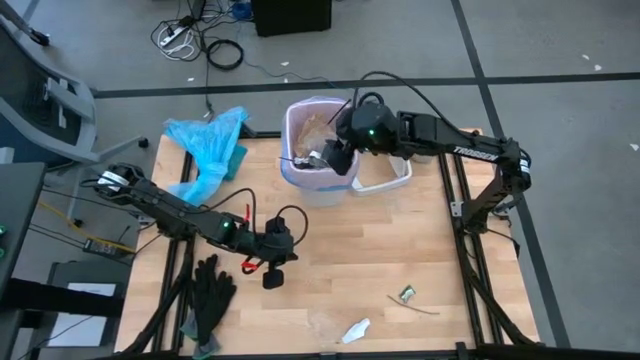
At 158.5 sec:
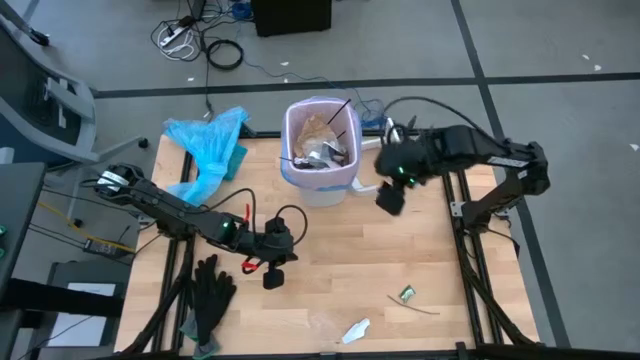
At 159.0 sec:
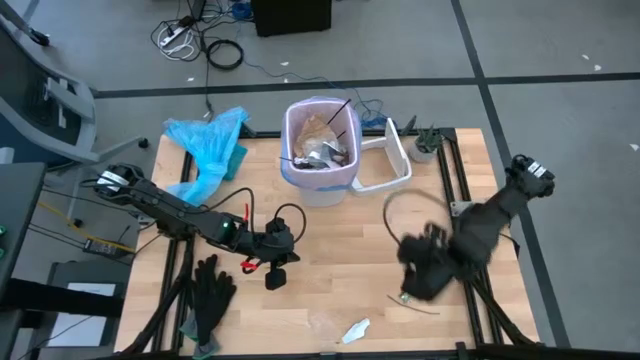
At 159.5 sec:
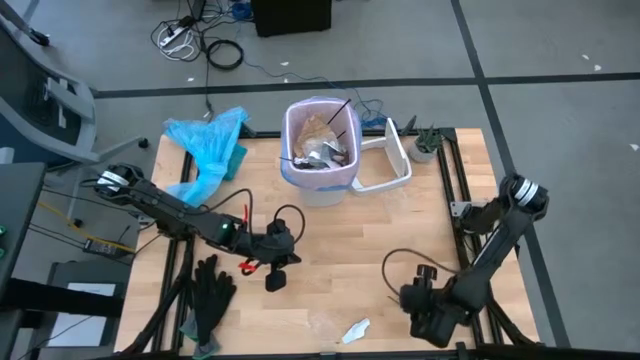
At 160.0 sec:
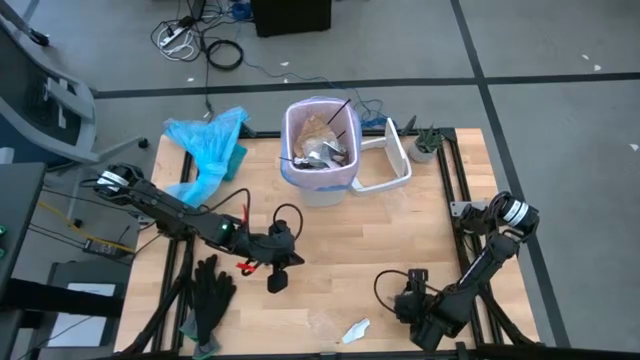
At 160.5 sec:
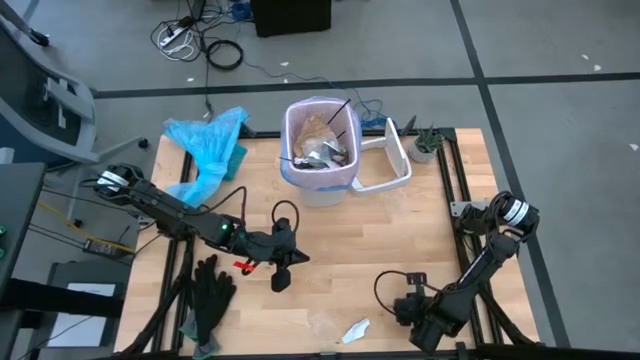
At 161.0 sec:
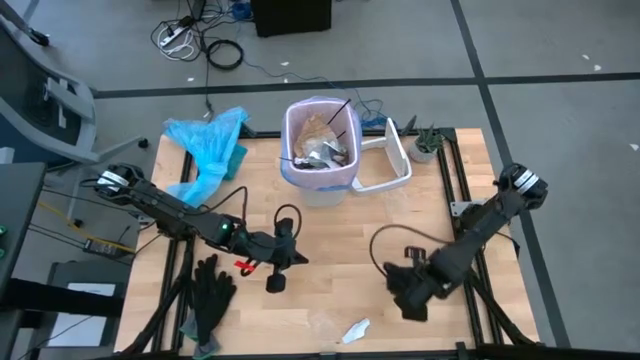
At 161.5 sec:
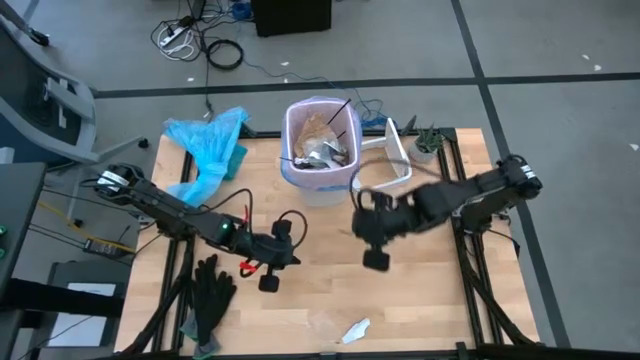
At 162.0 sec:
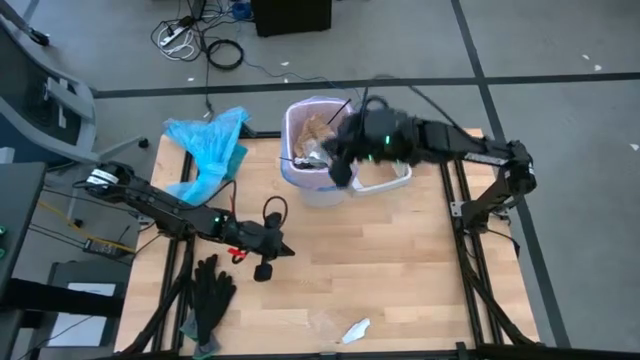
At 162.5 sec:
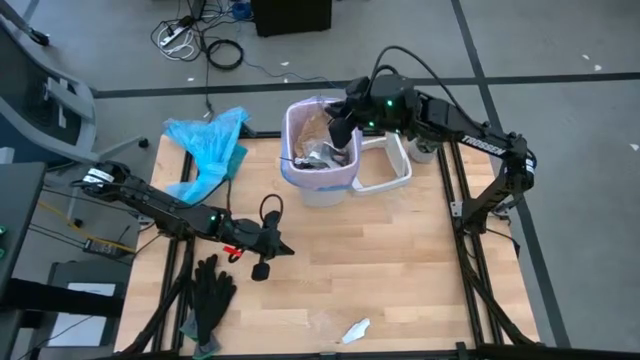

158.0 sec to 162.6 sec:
Task: place trash/remove bag and relplace
Put the green plastic material and black cable tie into the trash bin

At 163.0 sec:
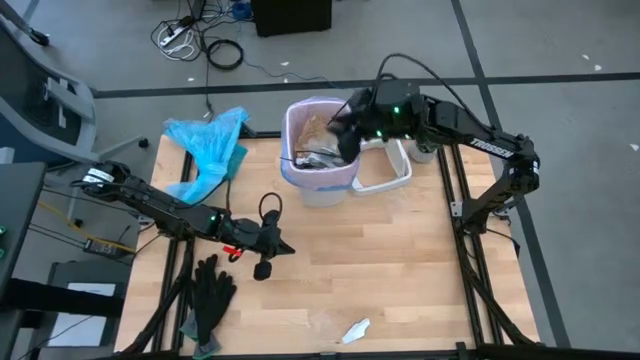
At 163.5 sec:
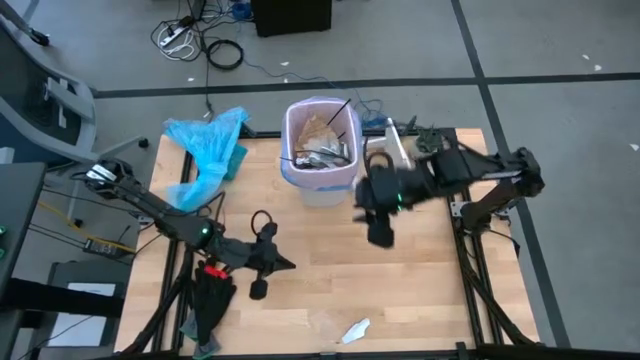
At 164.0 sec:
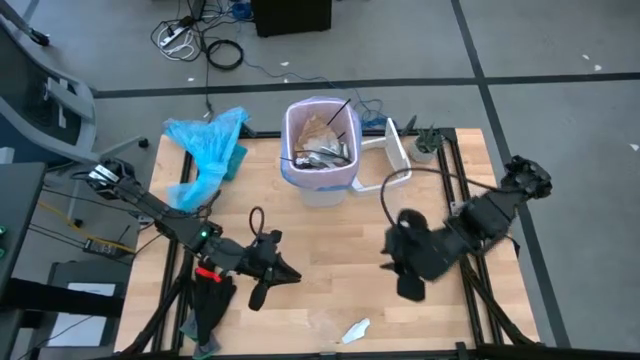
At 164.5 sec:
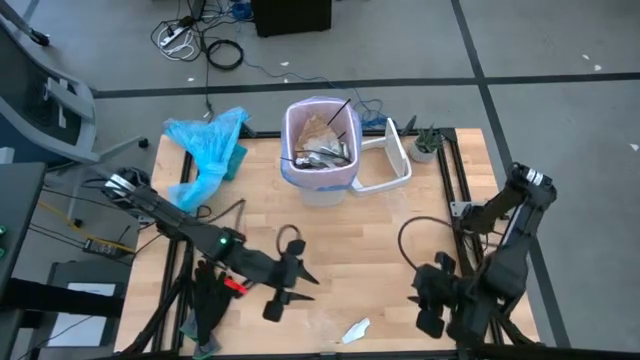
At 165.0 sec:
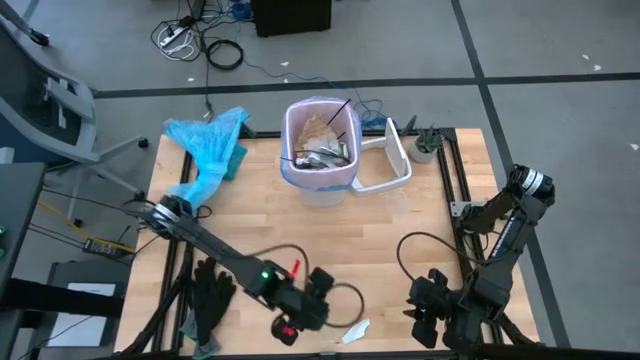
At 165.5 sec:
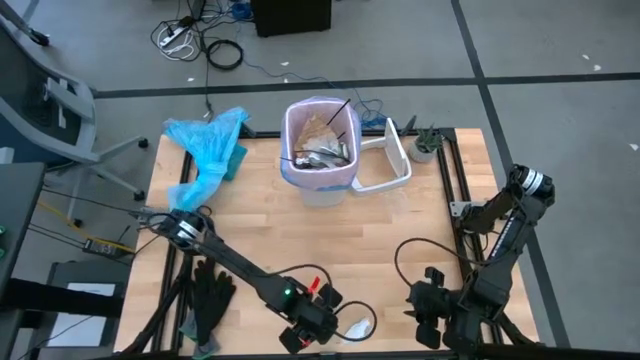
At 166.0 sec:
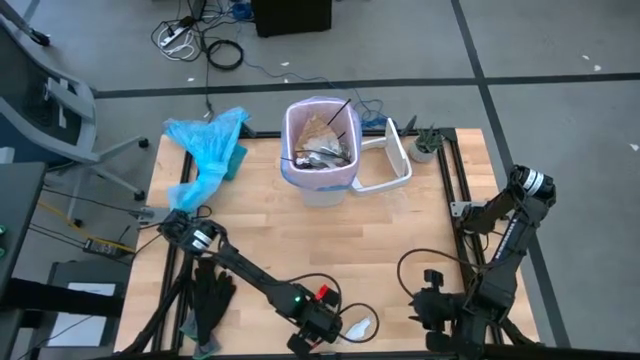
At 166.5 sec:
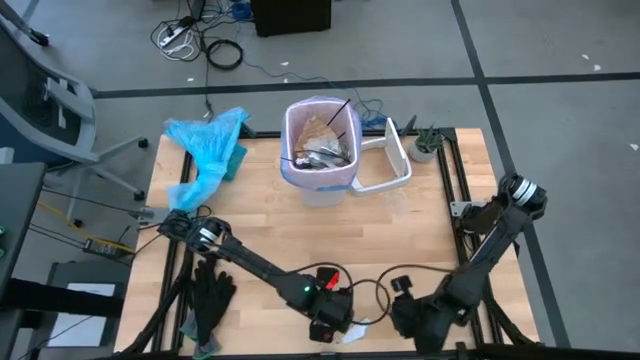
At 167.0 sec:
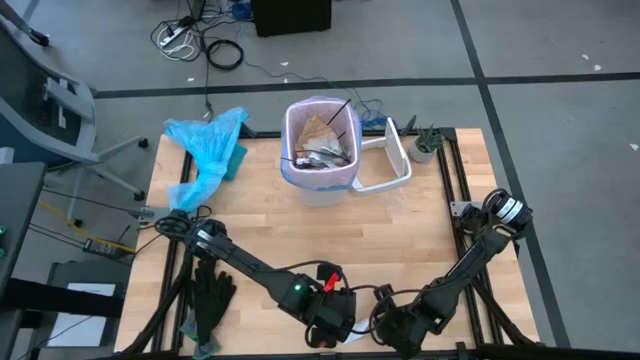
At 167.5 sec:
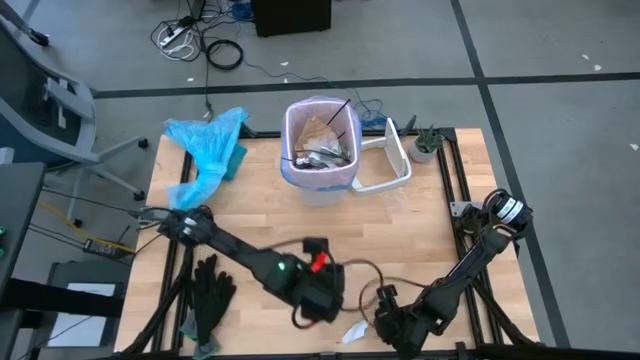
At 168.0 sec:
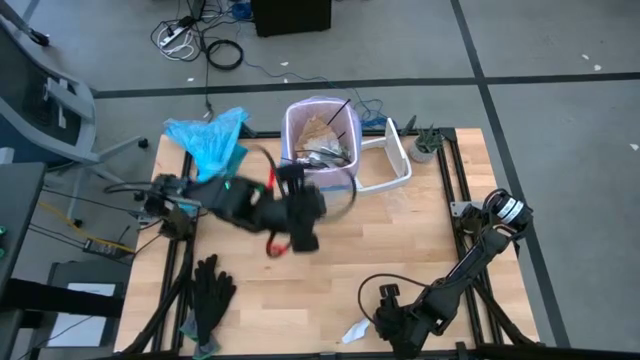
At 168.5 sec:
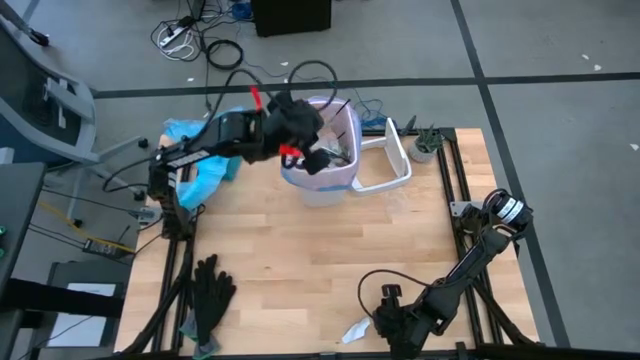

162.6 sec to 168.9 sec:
Put the clear cellophane into the trash bin

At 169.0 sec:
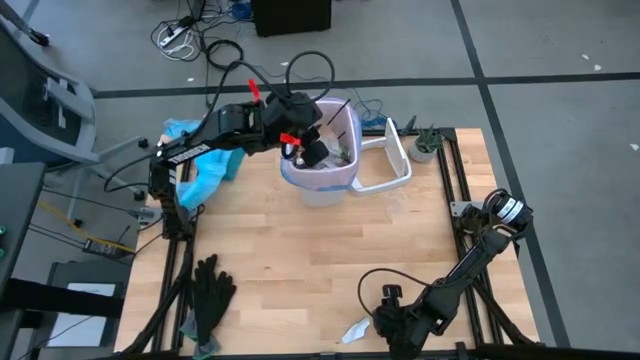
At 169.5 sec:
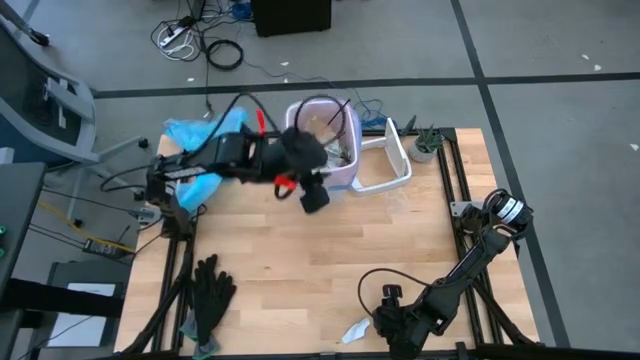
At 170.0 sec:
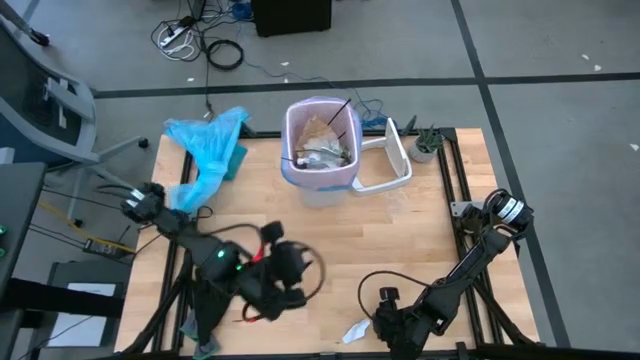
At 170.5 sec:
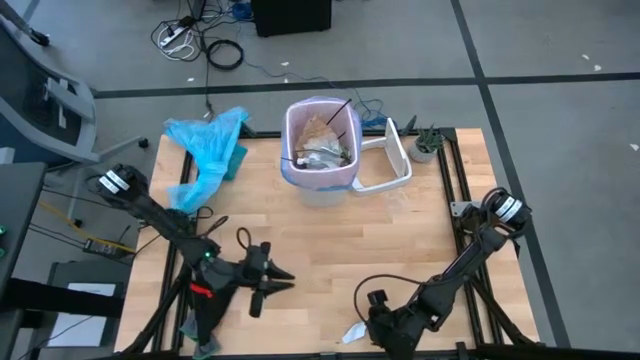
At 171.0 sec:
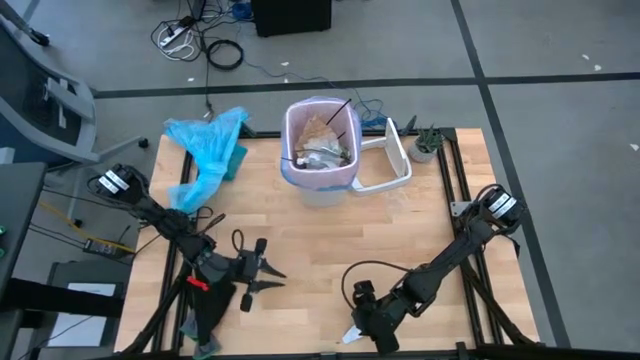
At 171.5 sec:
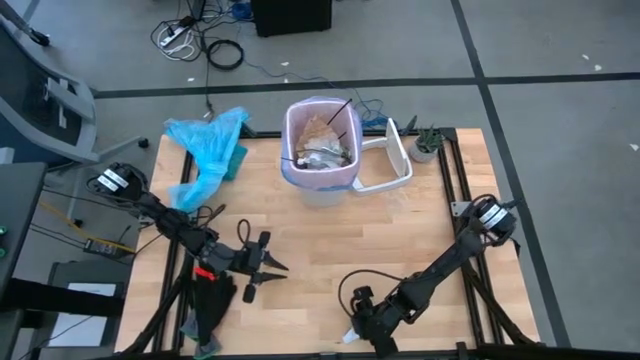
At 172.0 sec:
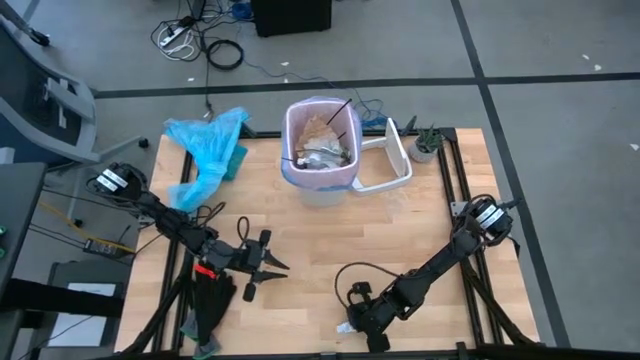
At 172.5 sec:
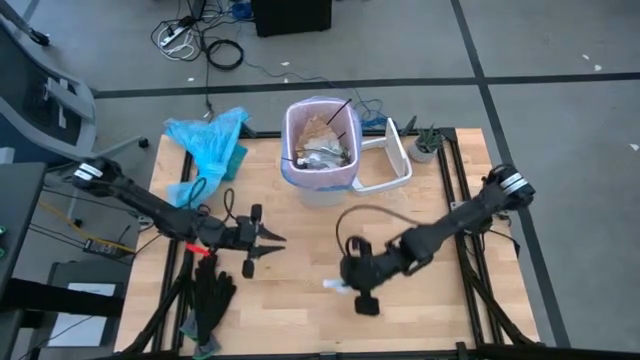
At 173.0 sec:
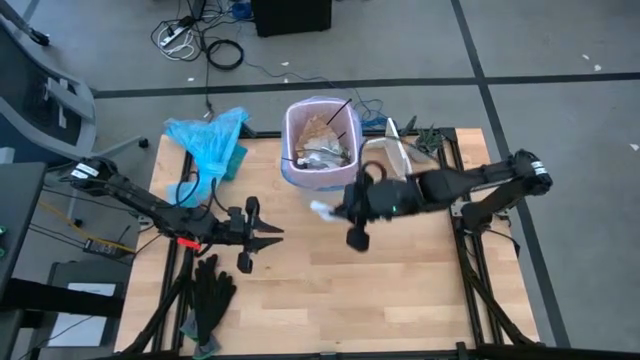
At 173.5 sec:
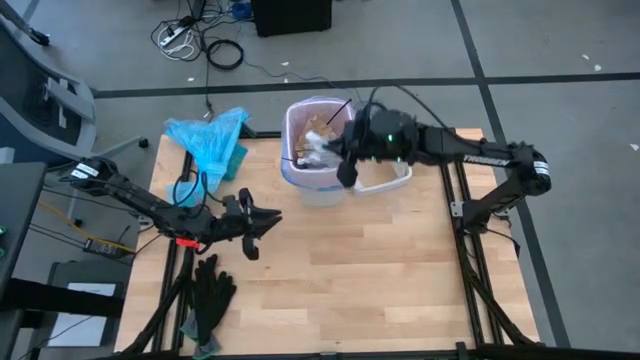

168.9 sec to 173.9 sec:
Put the white paper into the trash bin

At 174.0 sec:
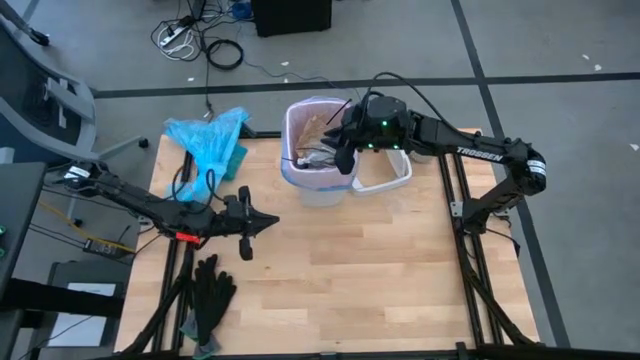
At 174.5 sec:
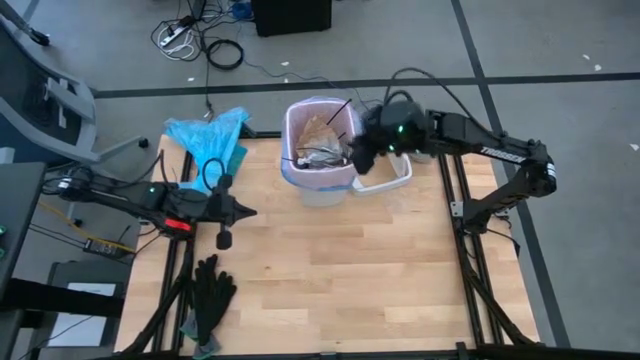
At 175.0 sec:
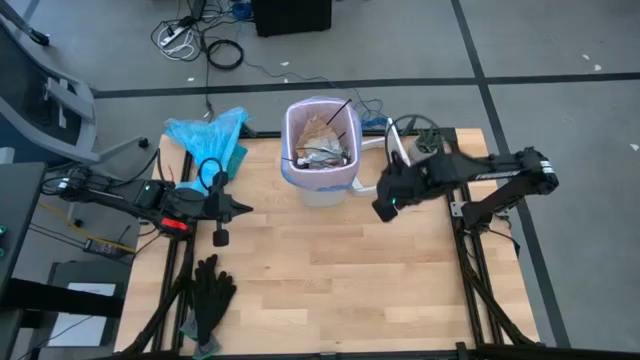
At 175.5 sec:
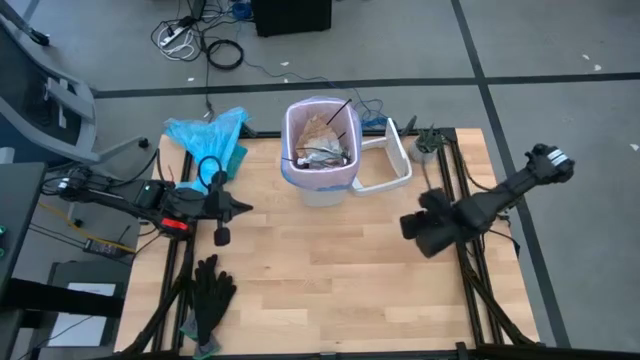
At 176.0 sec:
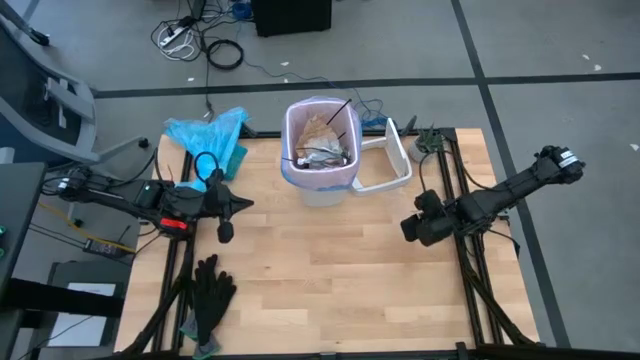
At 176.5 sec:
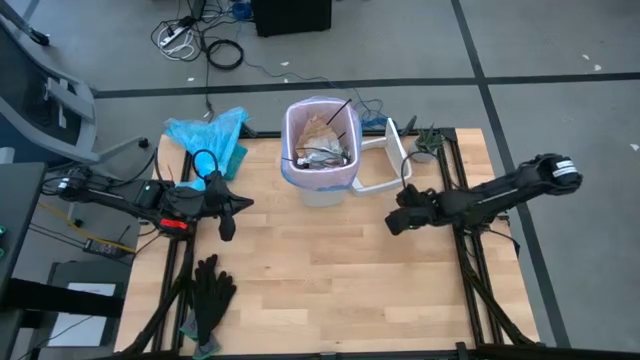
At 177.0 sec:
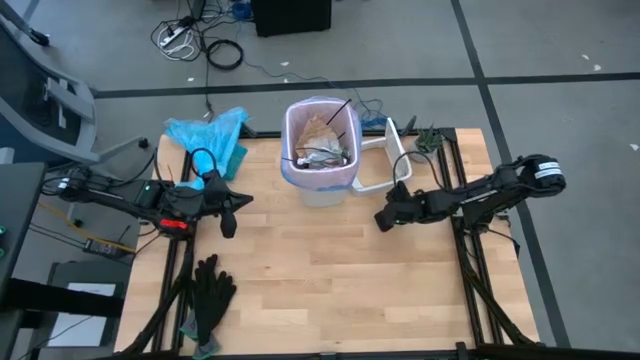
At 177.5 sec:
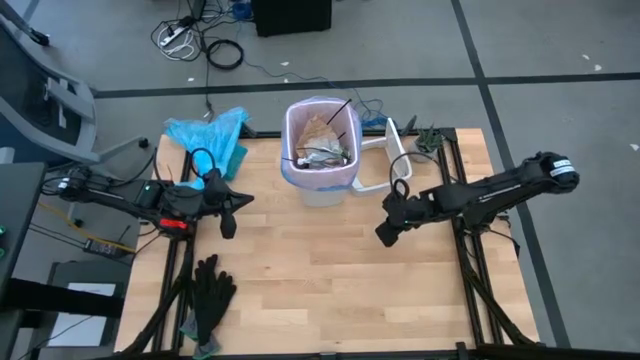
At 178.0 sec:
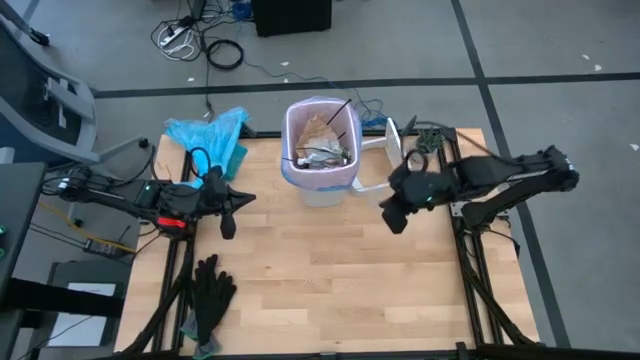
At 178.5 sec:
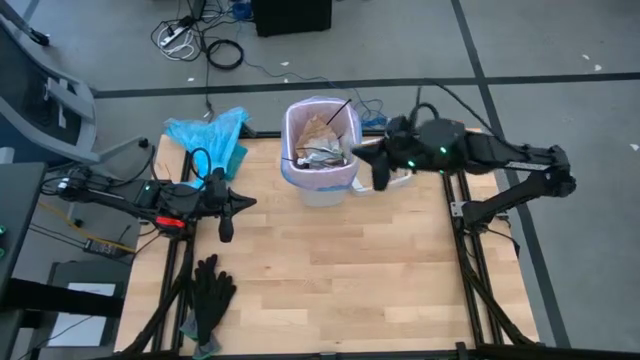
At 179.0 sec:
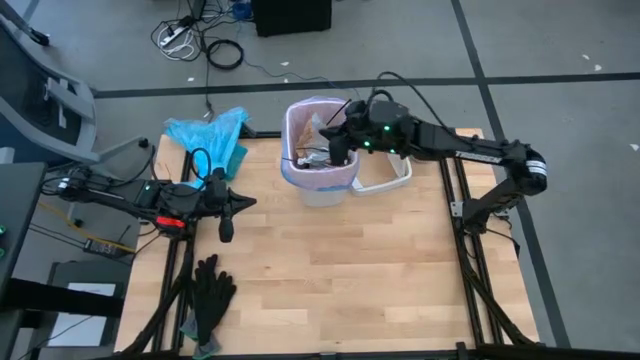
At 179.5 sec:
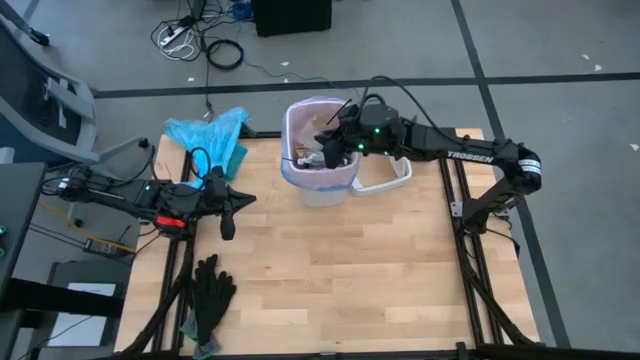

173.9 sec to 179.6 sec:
Put the clear cellophane into the trash bin
